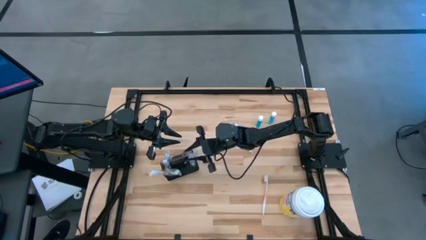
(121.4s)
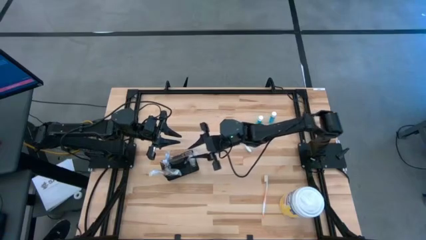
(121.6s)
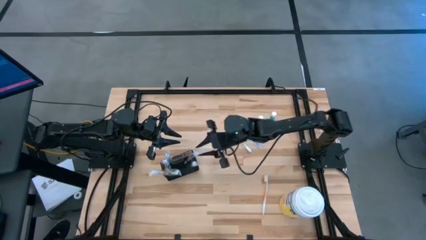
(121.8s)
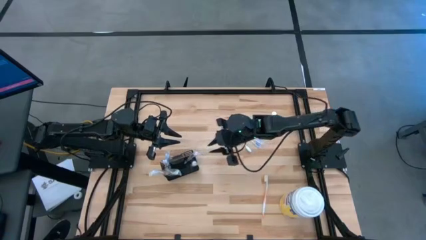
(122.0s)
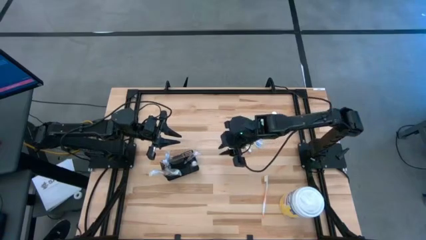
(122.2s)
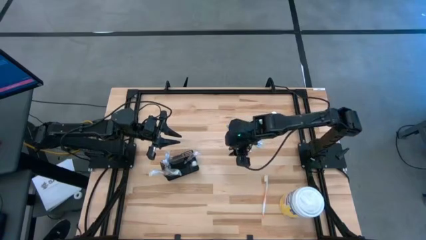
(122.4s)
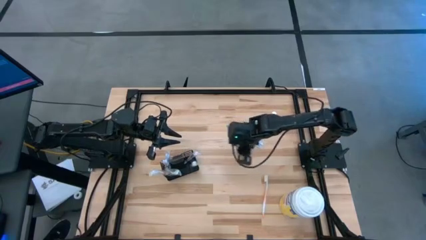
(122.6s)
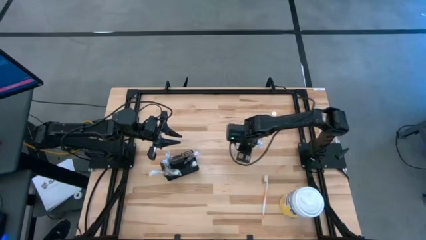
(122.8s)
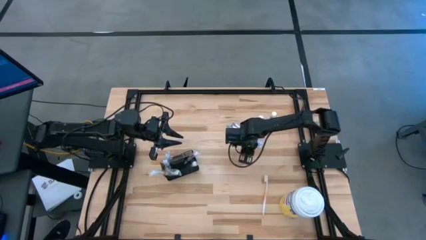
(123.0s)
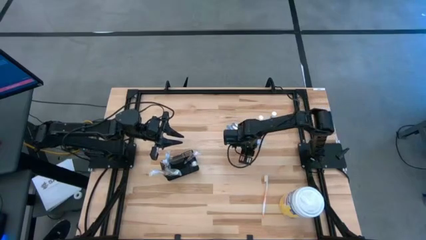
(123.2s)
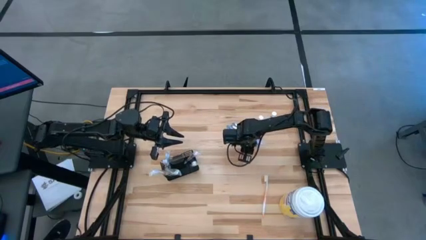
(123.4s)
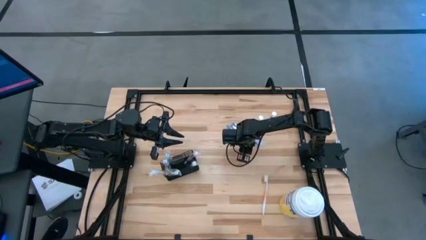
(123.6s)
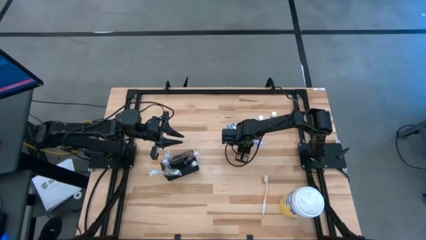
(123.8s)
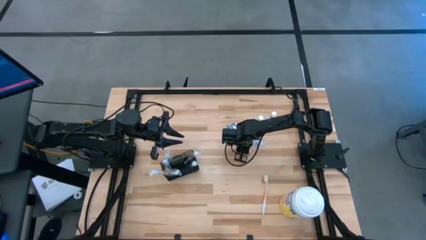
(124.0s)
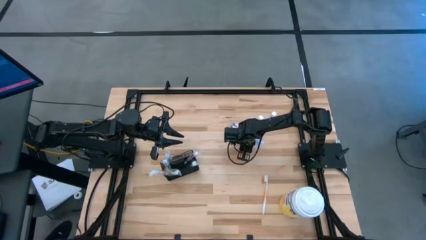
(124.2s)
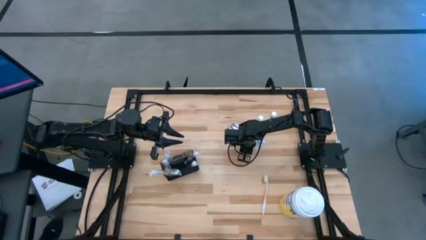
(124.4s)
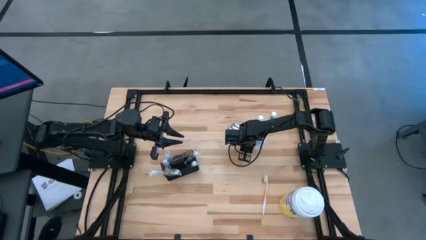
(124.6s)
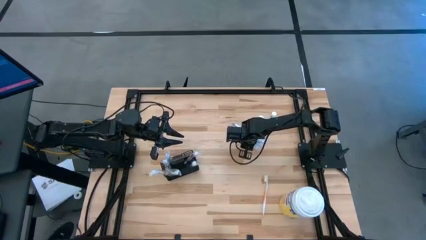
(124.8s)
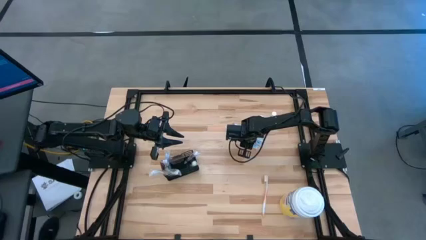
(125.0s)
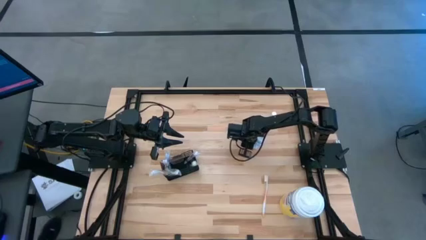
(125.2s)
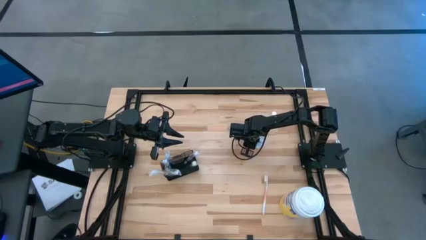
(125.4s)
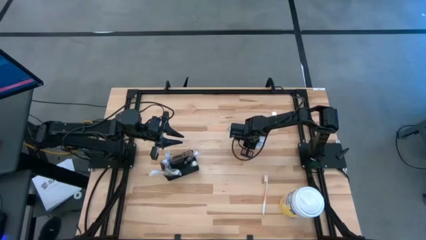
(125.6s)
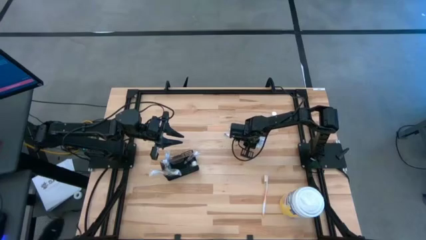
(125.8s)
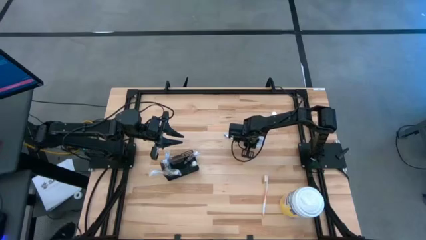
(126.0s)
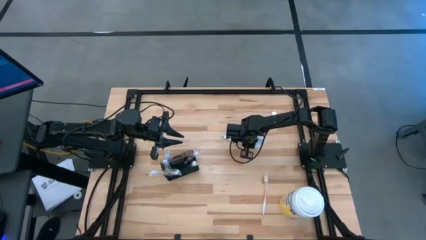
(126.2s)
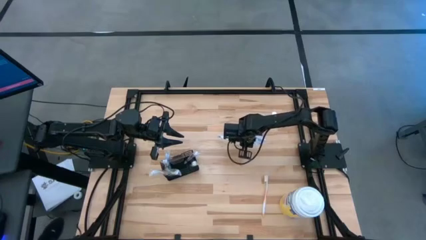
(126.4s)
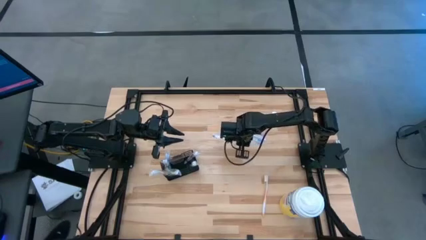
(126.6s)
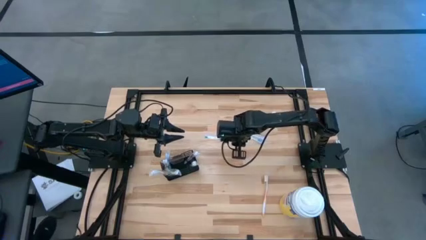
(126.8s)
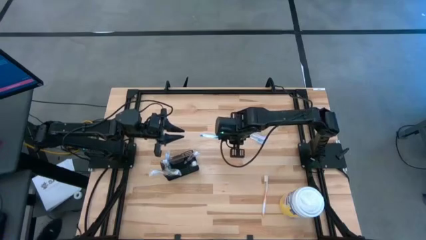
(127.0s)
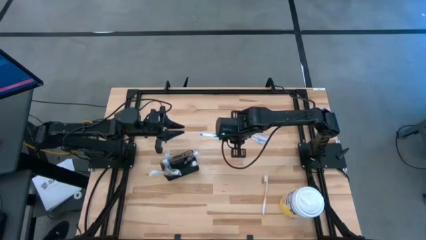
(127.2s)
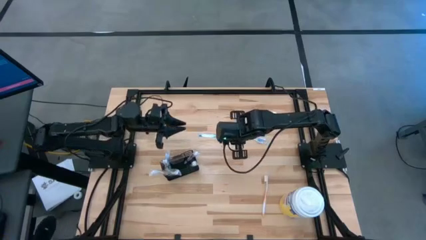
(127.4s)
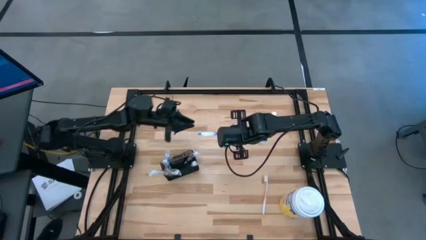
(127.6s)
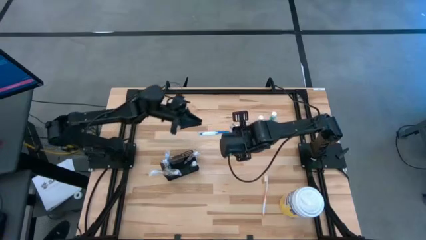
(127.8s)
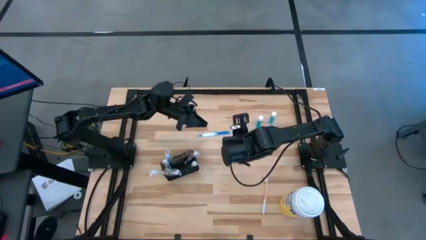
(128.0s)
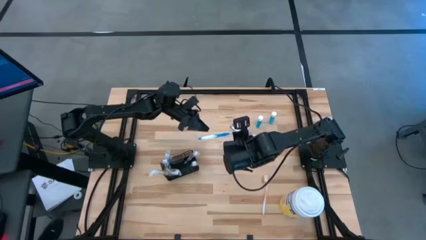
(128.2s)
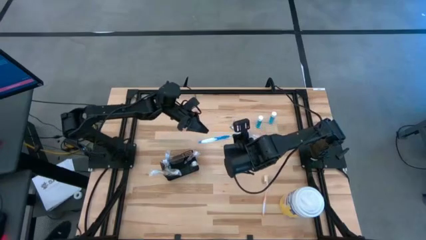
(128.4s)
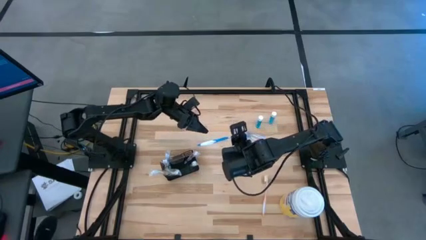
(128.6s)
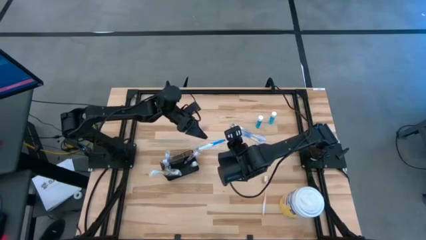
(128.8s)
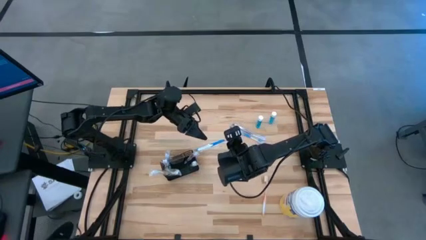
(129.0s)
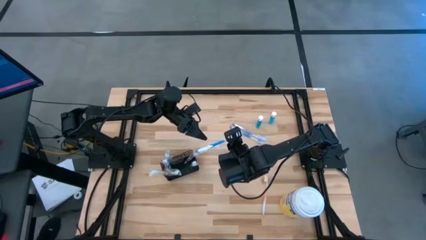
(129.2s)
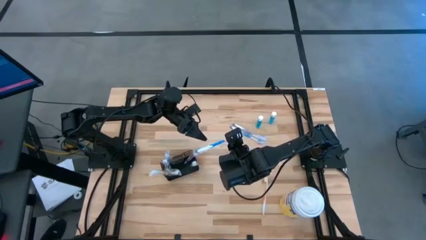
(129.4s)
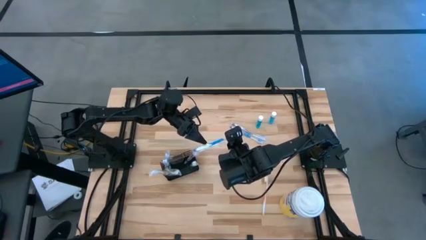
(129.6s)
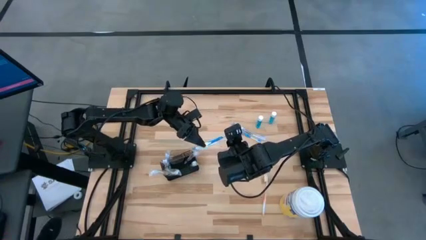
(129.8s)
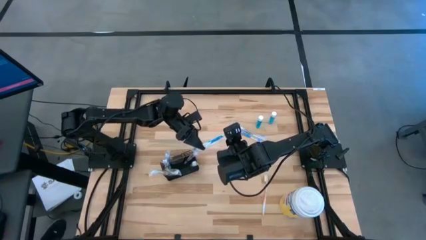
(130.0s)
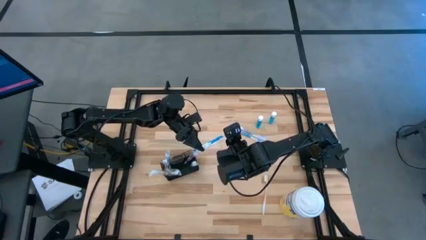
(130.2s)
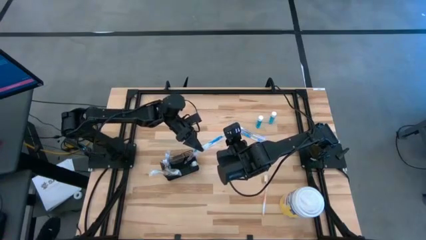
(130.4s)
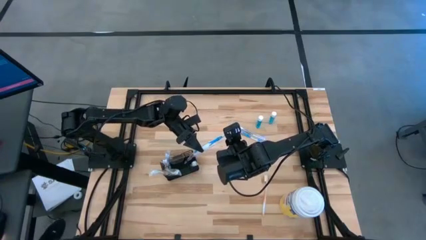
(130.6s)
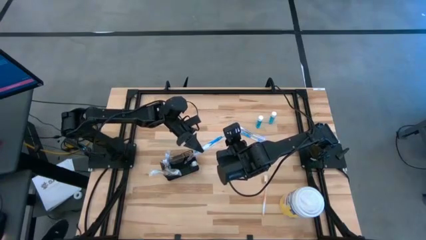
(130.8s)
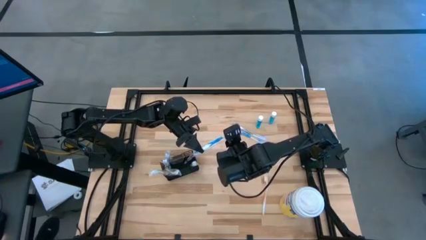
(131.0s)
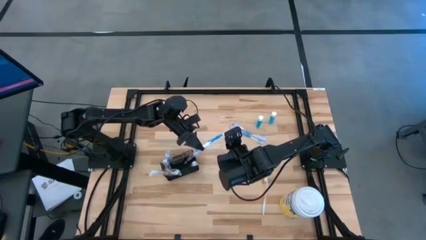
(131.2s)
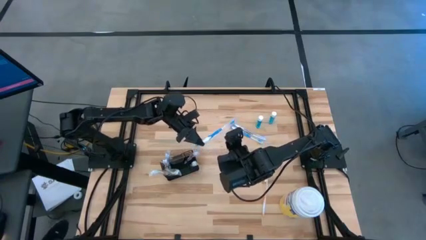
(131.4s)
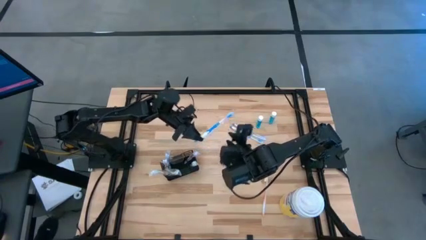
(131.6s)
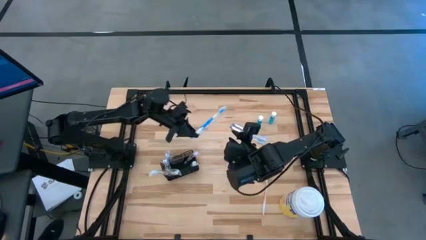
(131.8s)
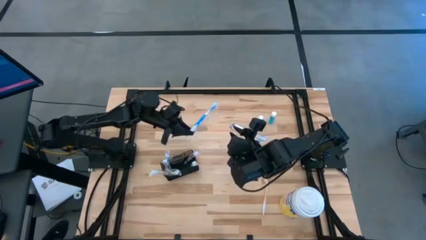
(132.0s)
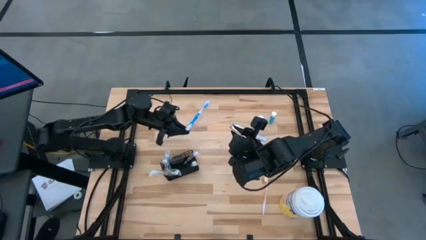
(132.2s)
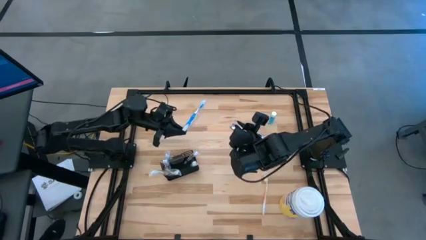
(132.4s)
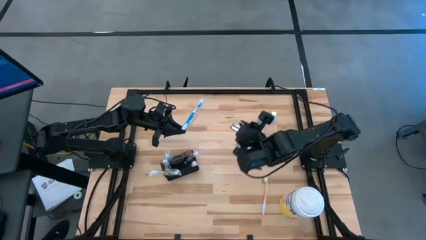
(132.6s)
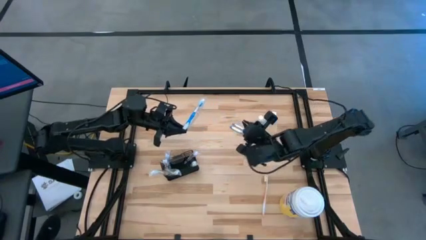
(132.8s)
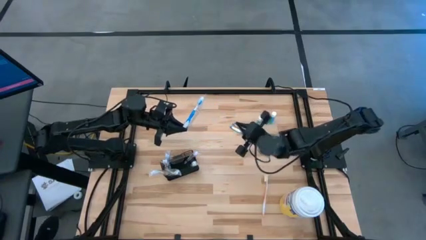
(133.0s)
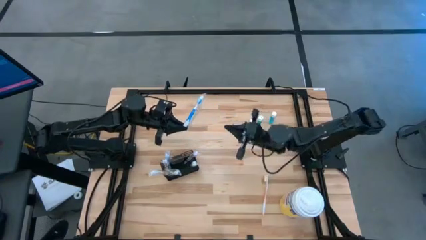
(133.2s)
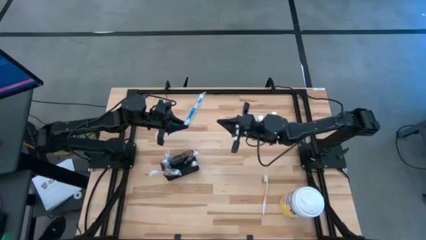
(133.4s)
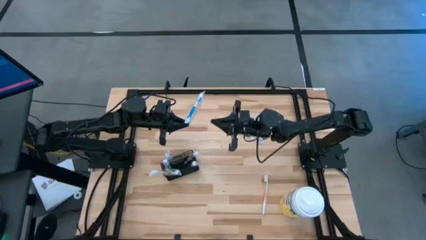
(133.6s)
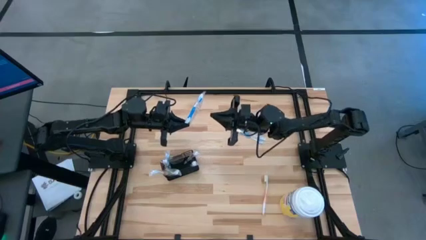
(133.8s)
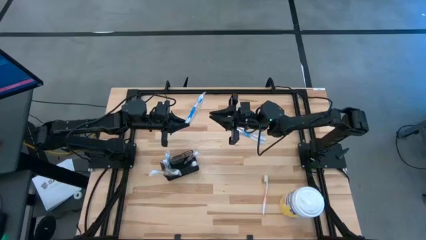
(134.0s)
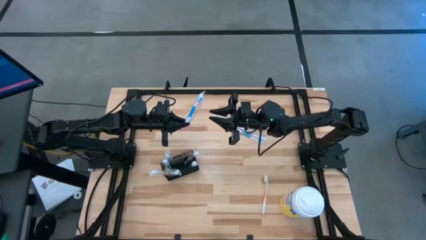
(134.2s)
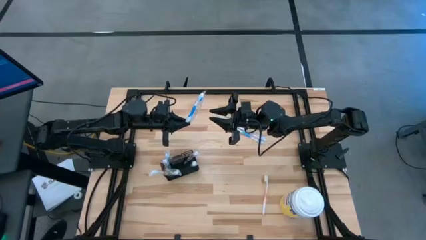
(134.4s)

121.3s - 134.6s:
Task: Pick & Place toothbrushing station
Put the left blue toothbrush into the top right section of the mesh organizer

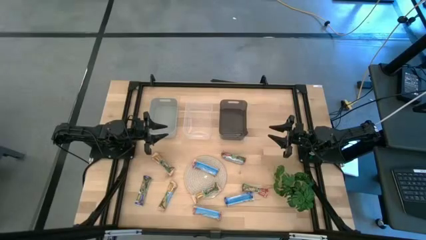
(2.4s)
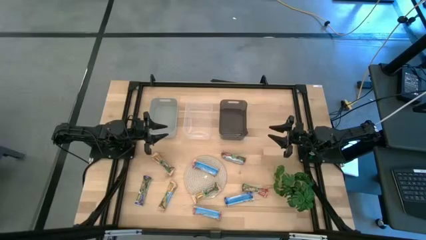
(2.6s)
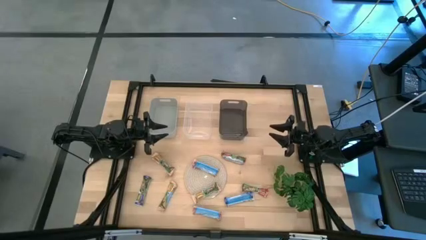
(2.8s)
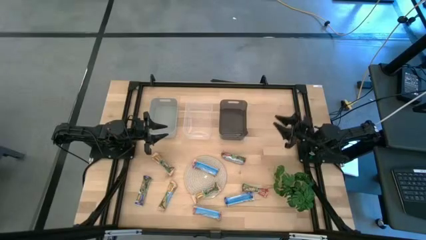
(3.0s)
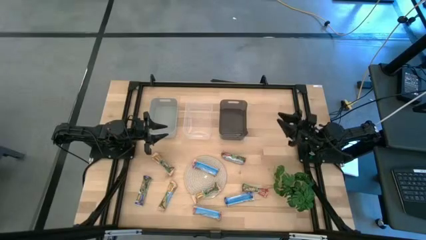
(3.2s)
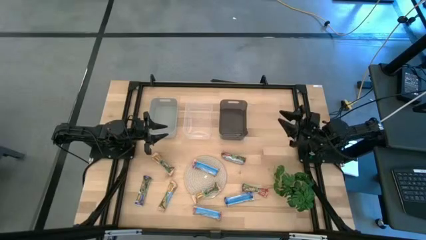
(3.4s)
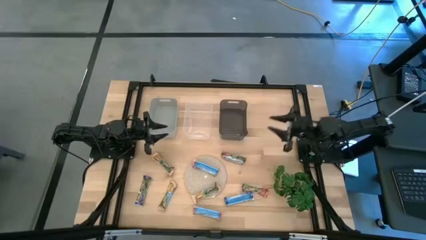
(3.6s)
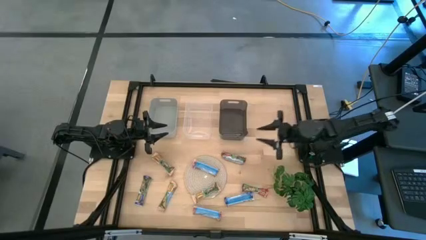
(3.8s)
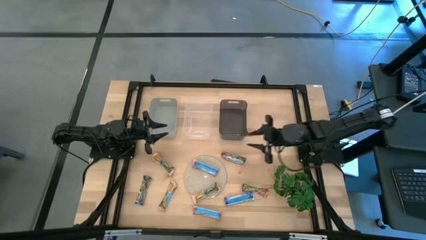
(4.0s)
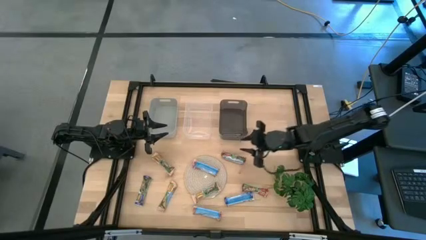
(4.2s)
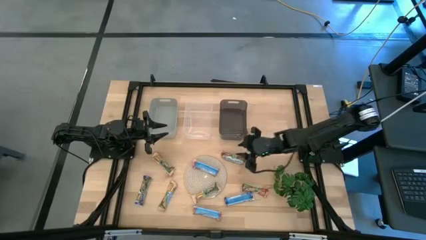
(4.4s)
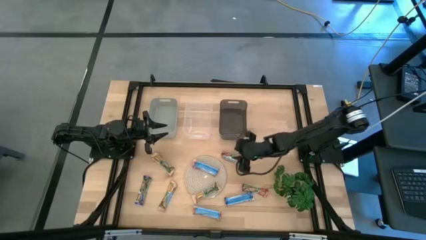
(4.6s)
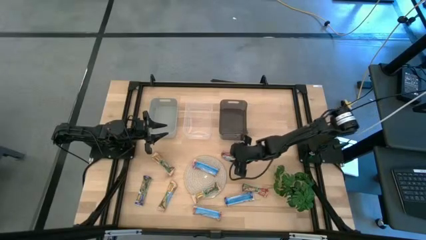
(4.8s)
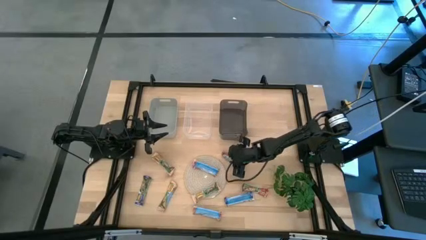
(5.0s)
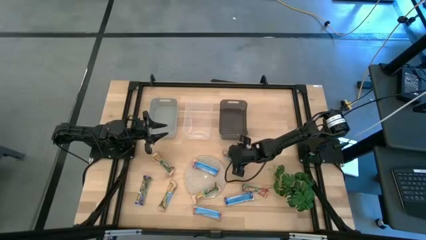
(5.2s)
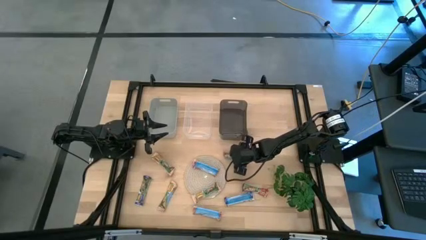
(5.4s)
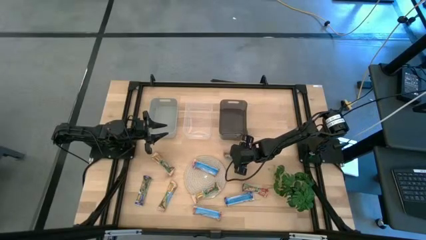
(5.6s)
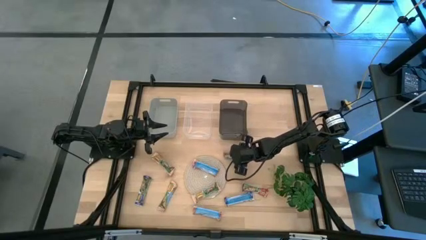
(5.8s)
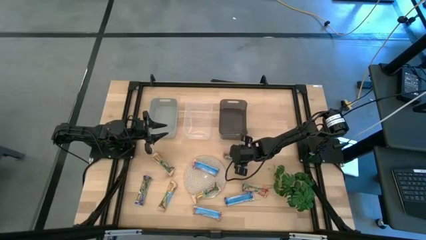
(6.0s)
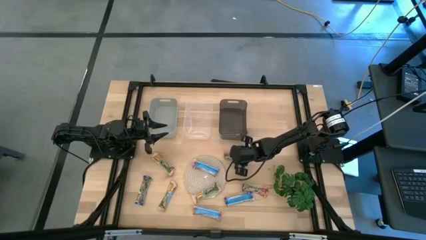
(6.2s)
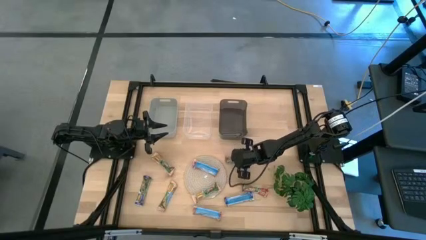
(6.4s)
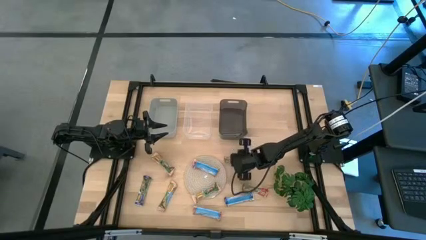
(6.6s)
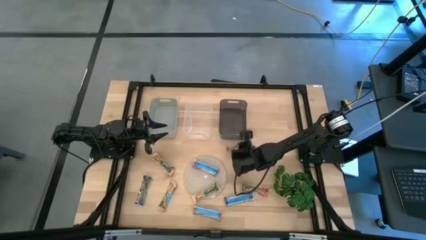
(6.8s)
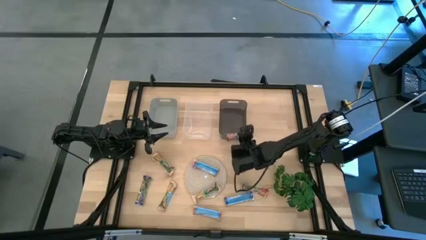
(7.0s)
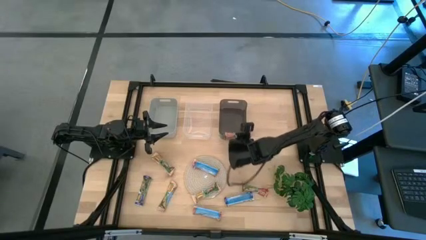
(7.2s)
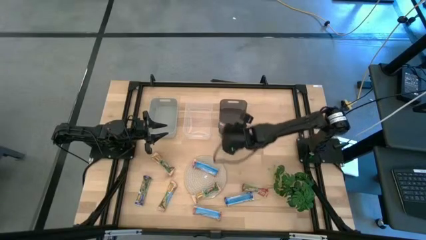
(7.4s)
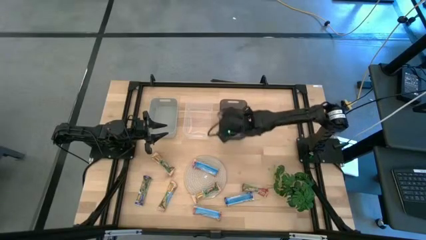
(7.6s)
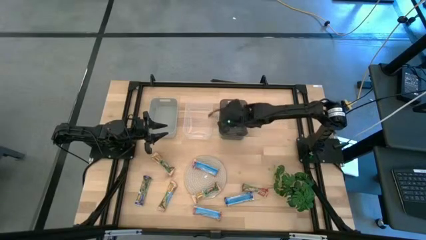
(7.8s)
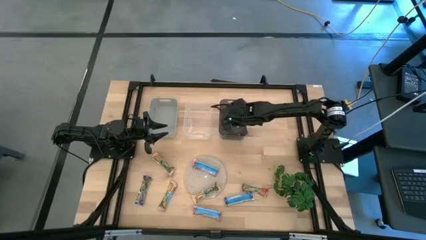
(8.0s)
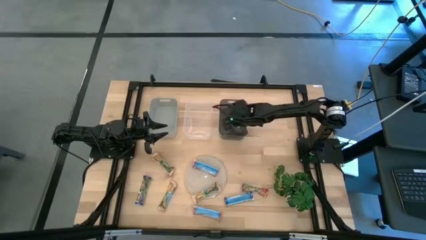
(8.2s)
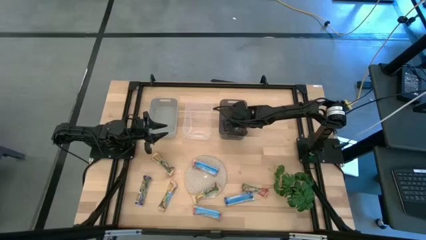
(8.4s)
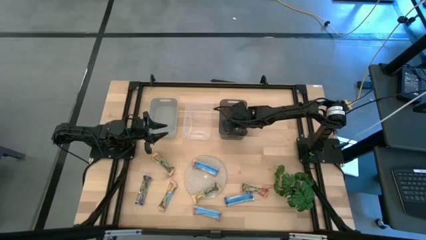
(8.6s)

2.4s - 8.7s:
Task: Pick and place Granola Bars by type
Put the red granola bar into the black bin
